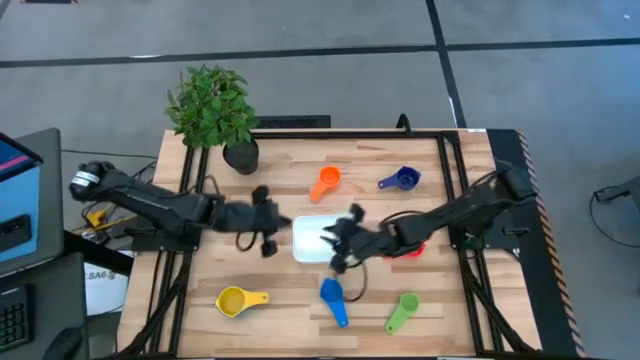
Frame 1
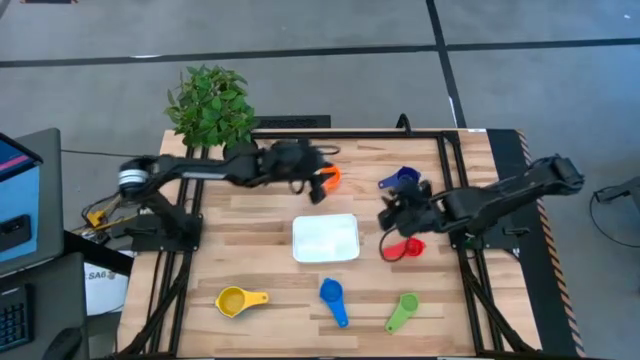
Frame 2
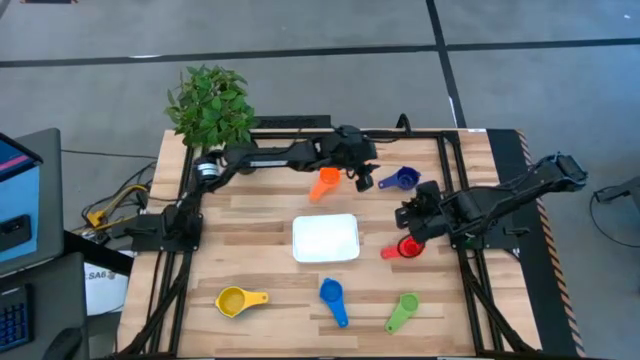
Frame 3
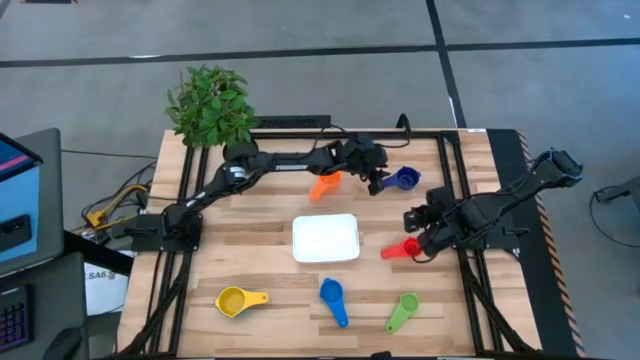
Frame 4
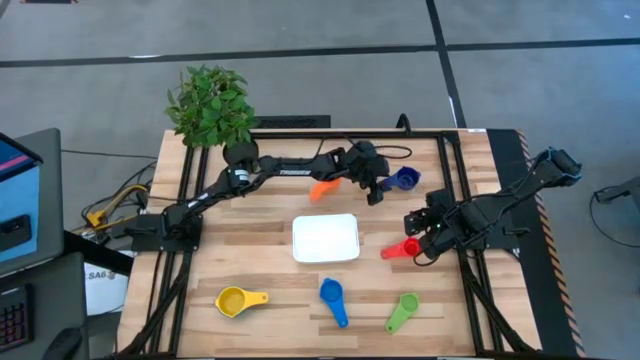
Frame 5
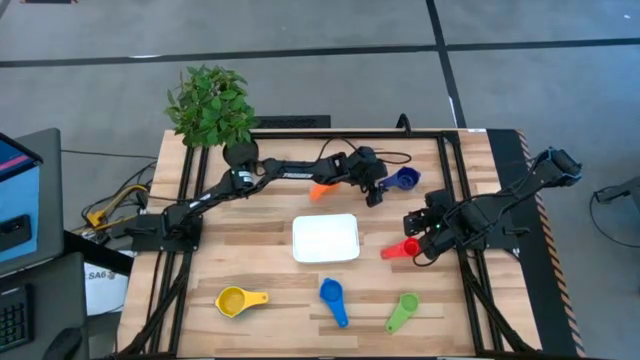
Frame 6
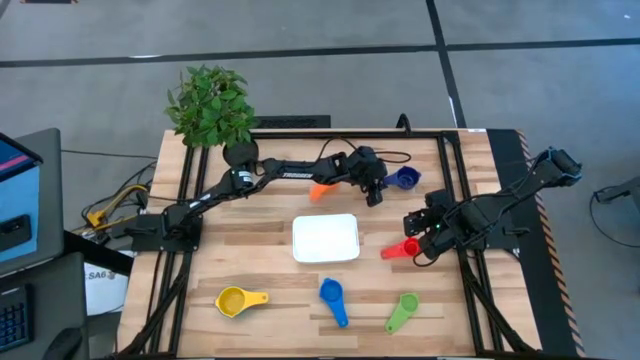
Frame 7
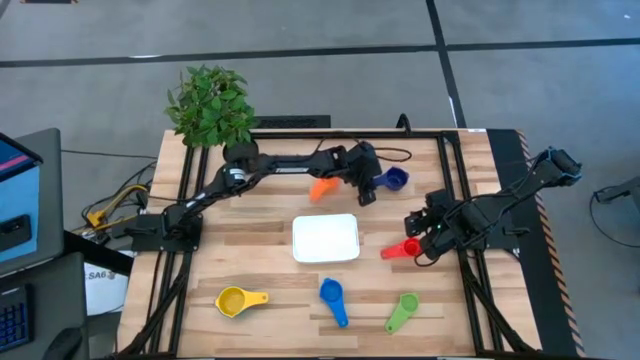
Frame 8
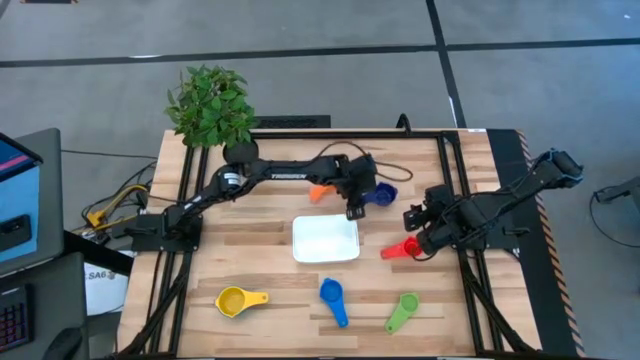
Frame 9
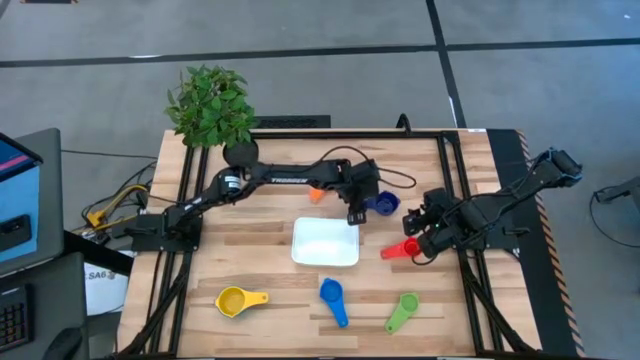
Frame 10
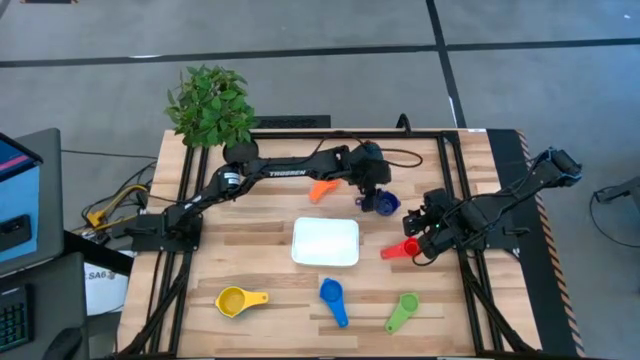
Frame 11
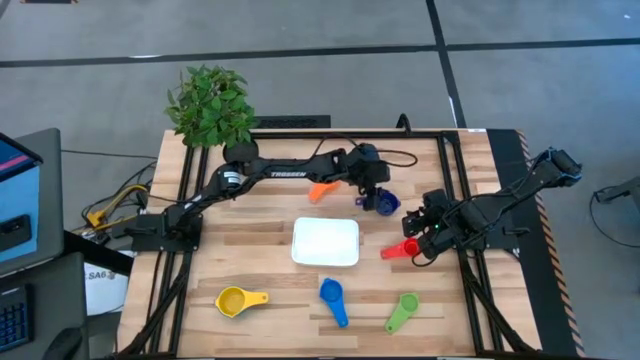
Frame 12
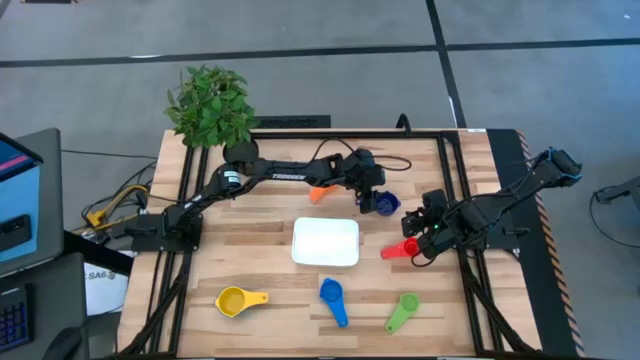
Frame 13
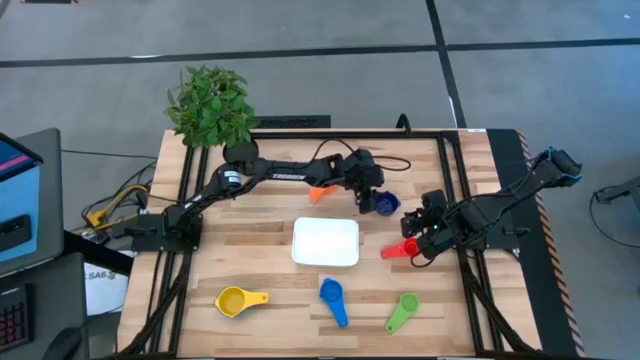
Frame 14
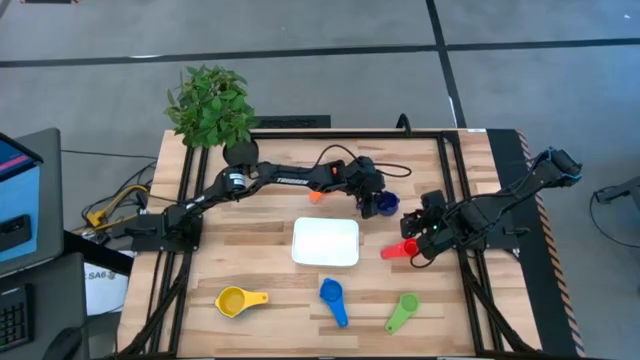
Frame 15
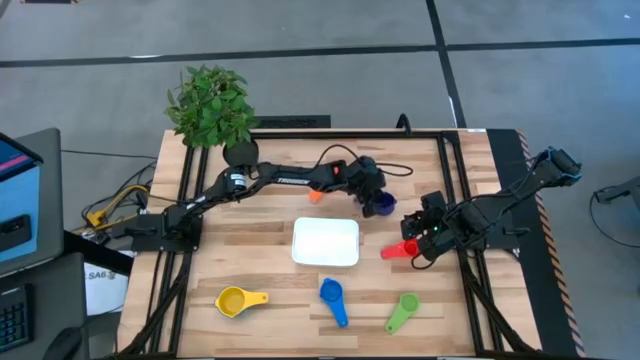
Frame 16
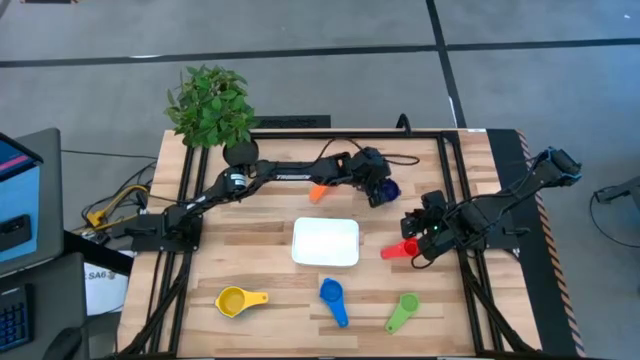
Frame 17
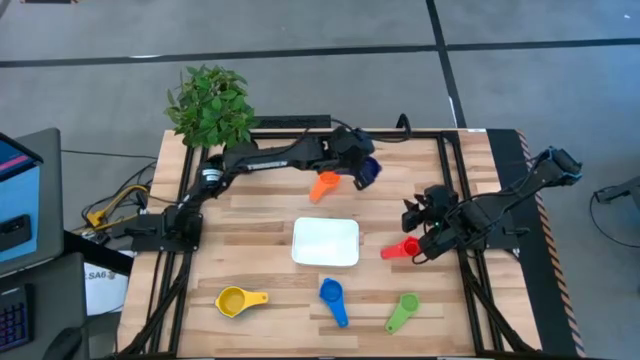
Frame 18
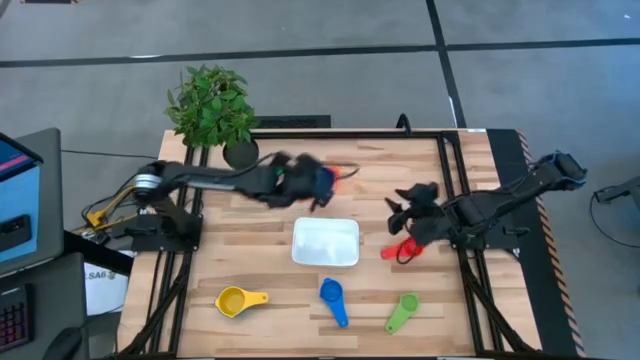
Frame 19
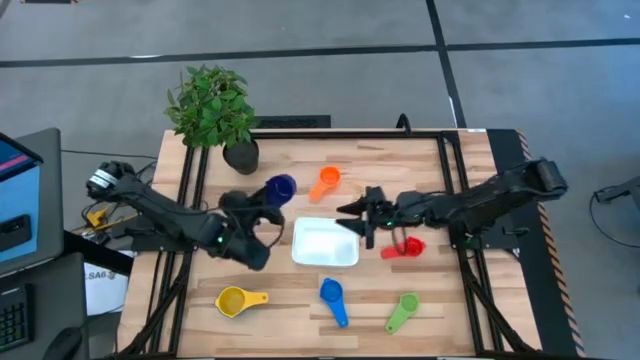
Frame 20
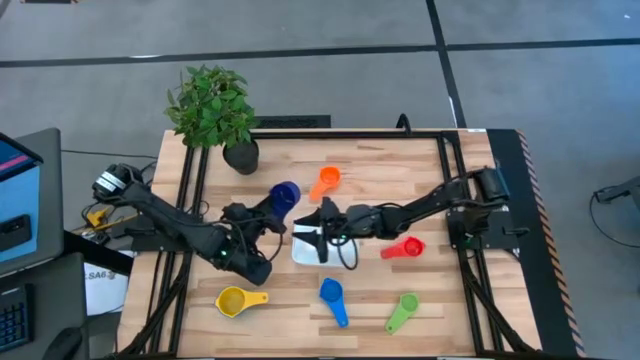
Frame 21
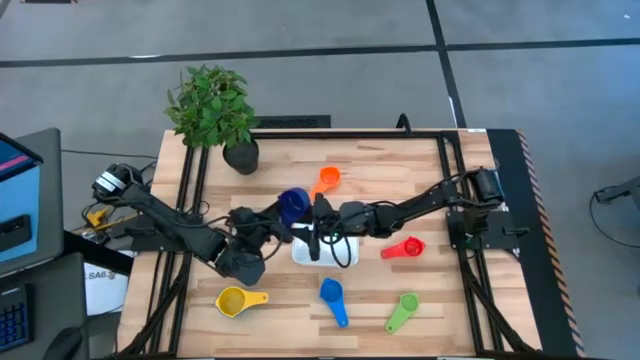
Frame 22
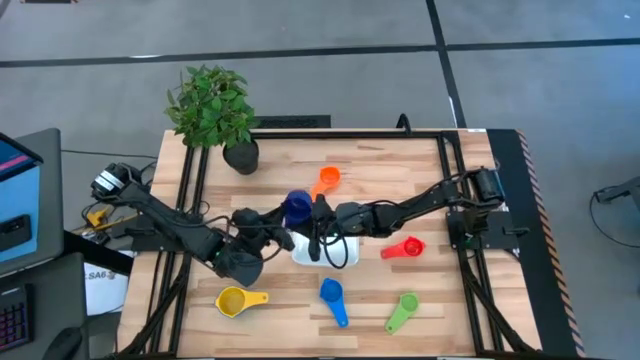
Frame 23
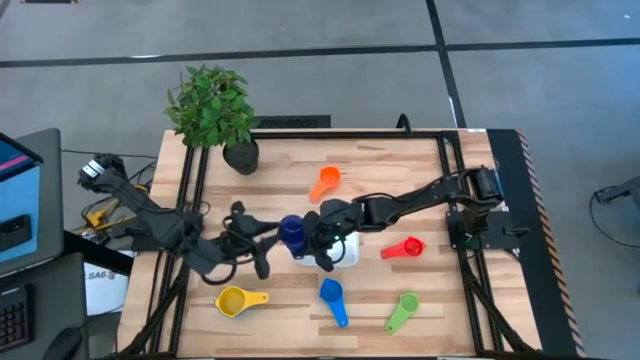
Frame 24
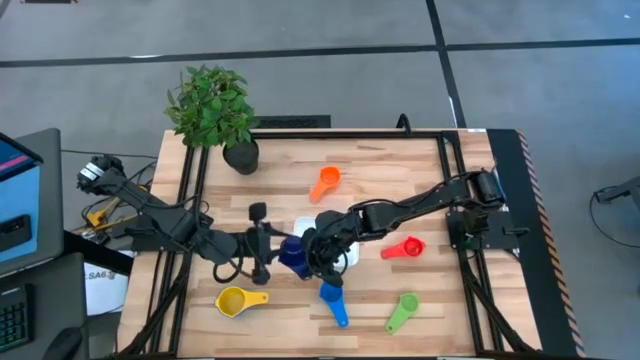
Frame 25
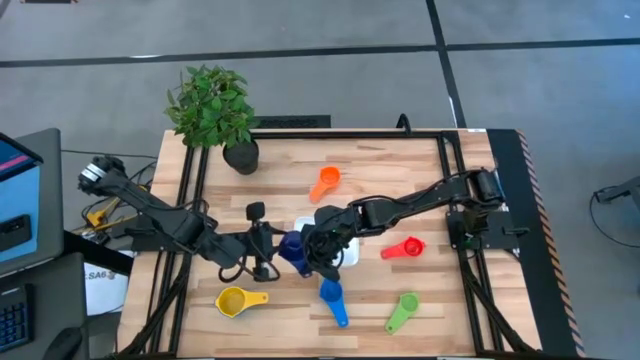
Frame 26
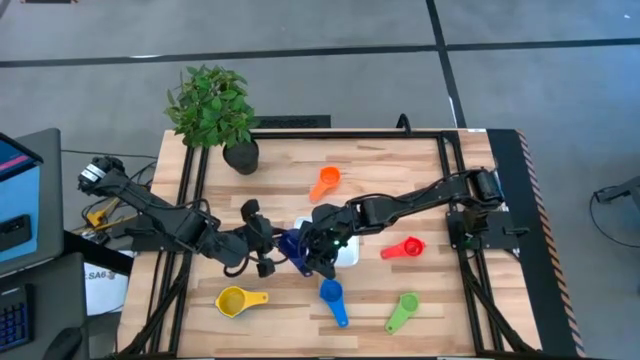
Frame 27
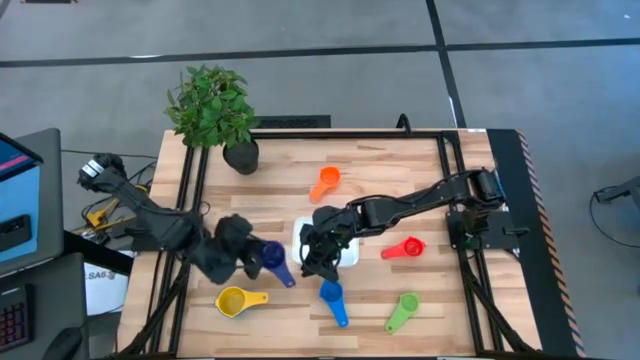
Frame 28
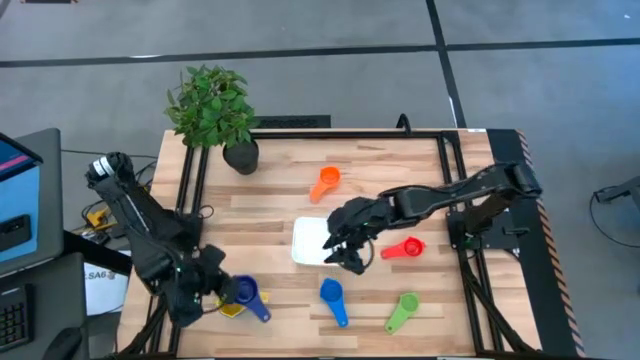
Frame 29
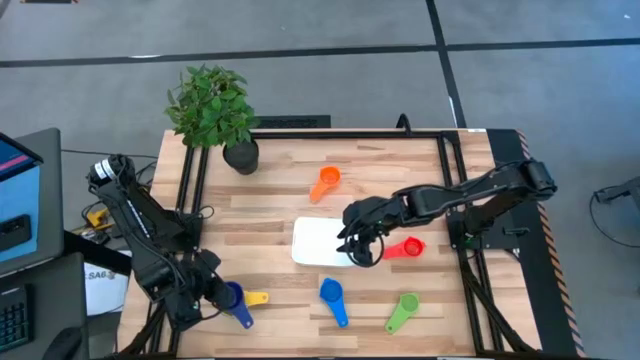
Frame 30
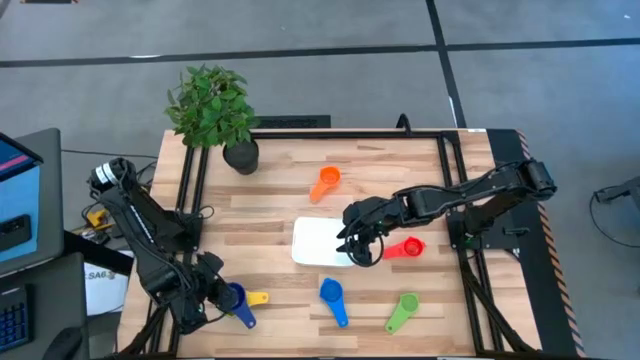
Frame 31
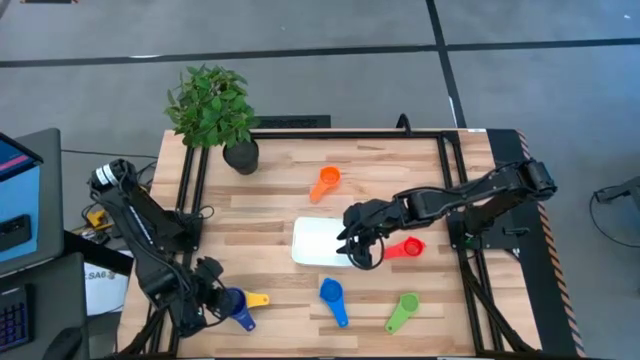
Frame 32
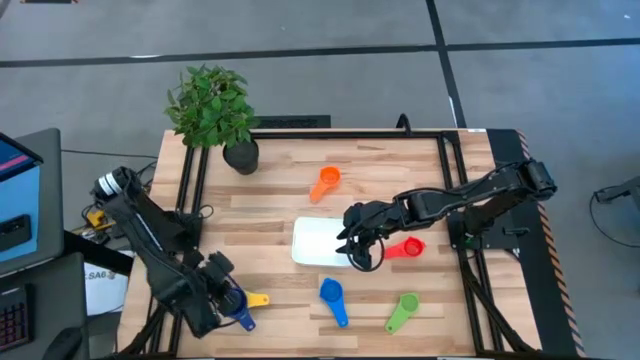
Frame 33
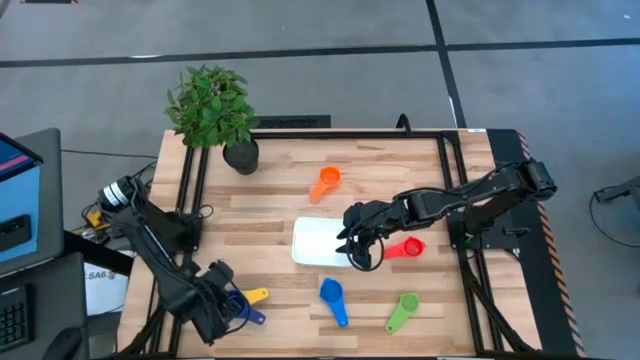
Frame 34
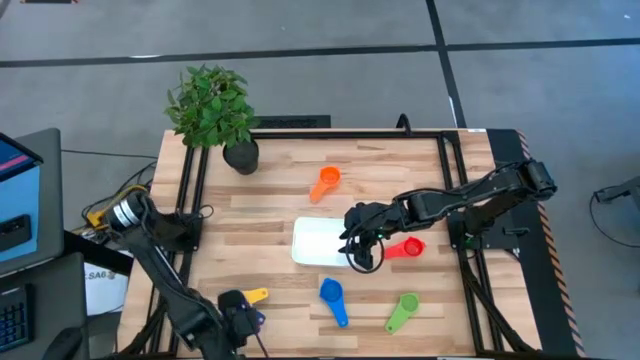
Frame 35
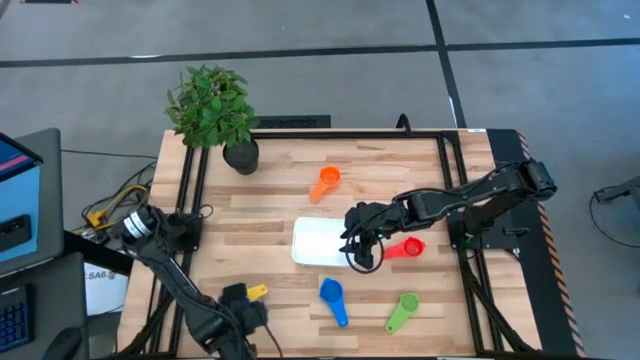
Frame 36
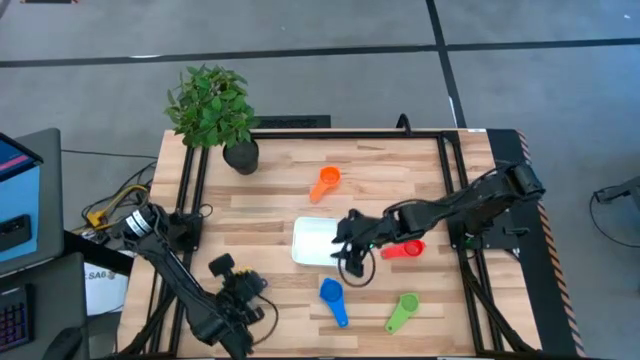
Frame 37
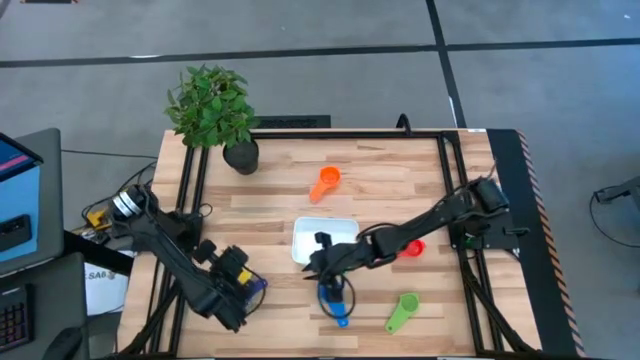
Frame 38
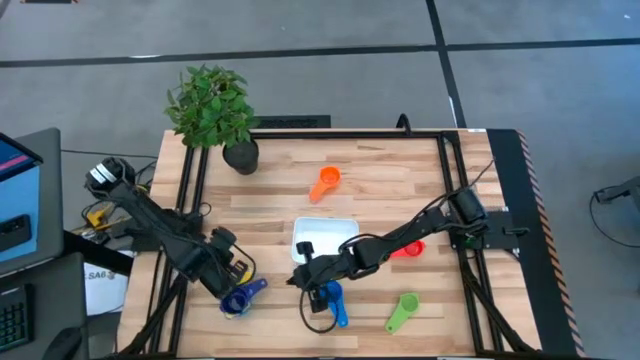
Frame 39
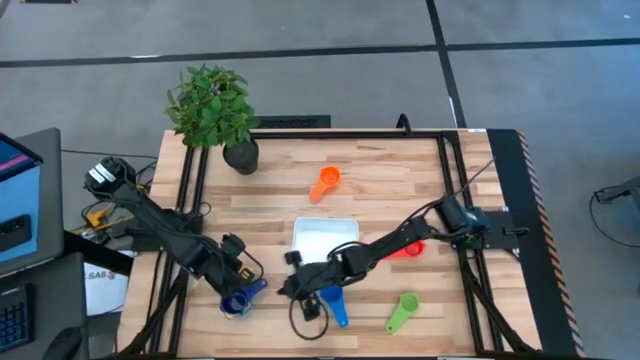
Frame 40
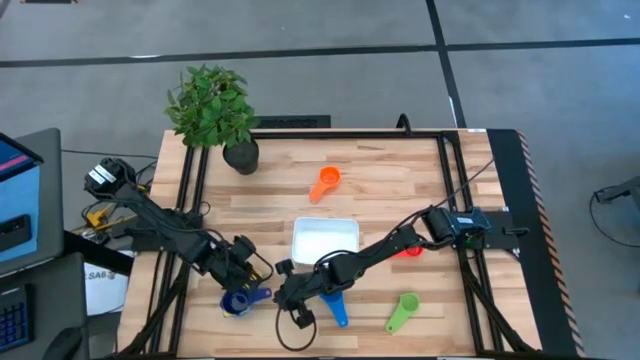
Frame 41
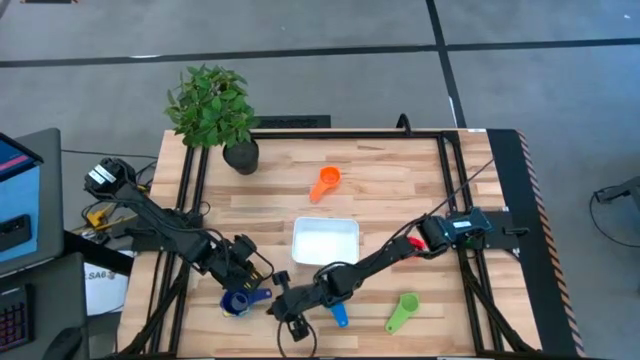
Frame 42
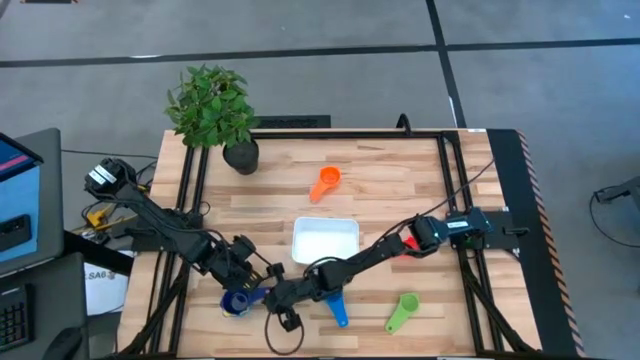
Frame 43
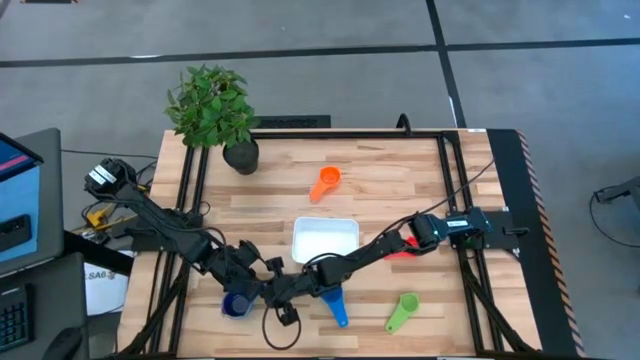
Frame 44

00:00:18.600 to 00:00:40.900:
Task: Nest measuring cups in basket
Stack the purple measuring cup into the yellow measuring cup
